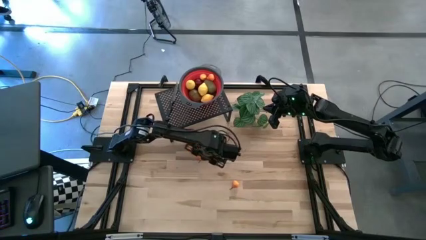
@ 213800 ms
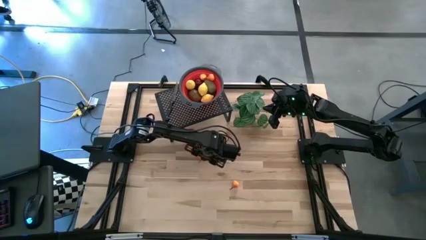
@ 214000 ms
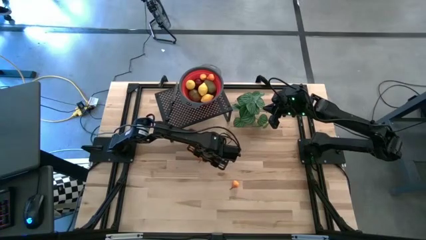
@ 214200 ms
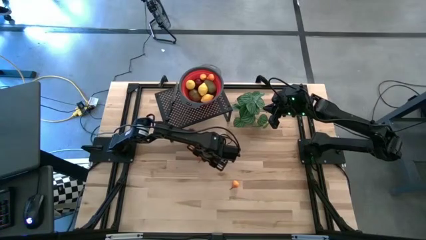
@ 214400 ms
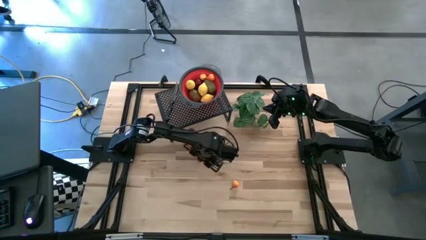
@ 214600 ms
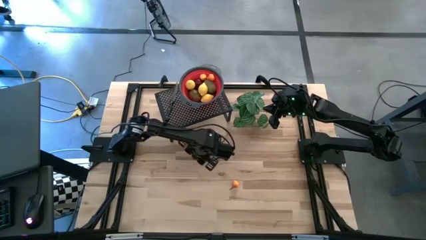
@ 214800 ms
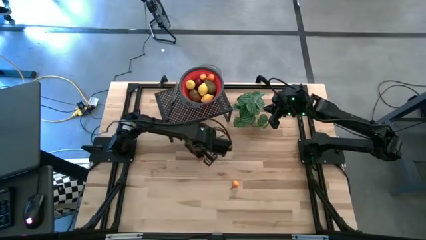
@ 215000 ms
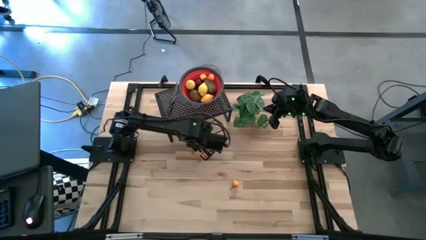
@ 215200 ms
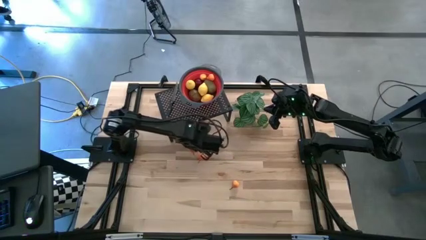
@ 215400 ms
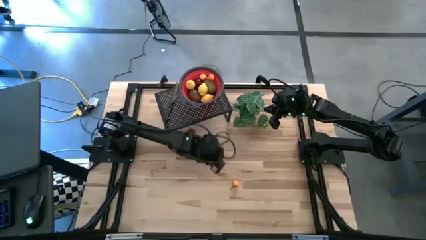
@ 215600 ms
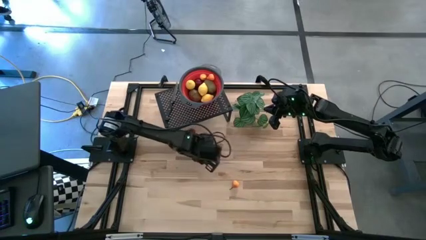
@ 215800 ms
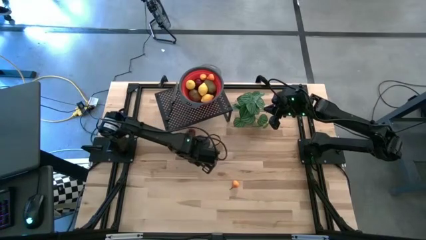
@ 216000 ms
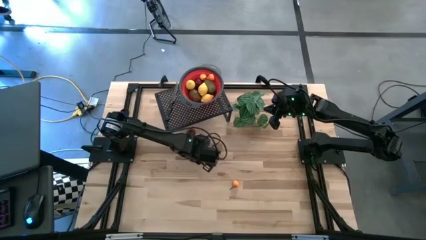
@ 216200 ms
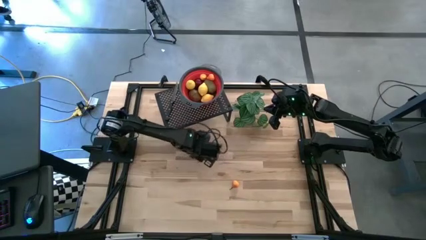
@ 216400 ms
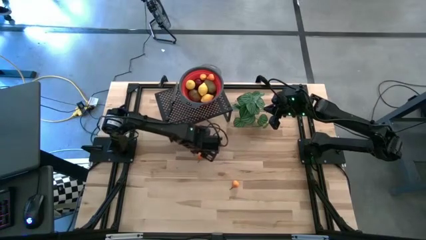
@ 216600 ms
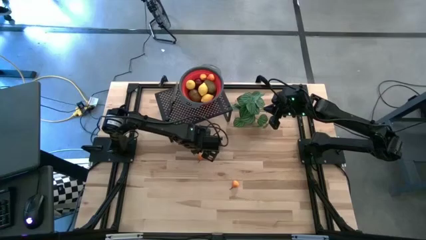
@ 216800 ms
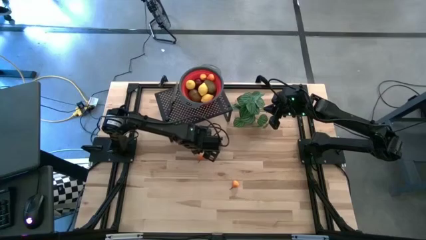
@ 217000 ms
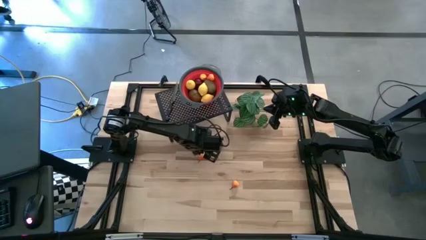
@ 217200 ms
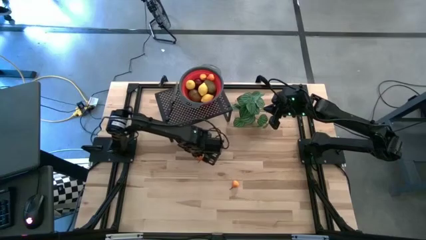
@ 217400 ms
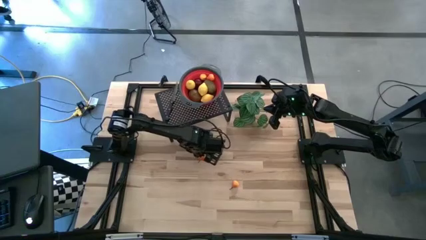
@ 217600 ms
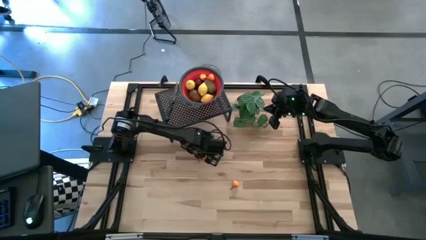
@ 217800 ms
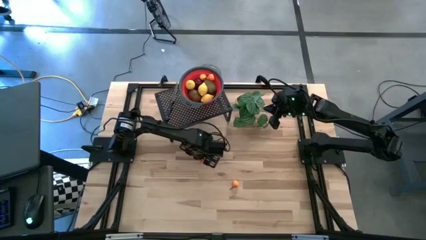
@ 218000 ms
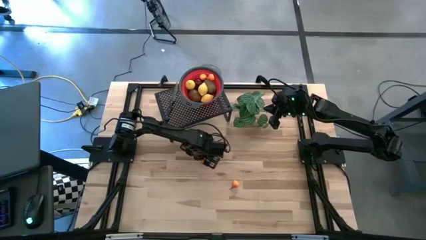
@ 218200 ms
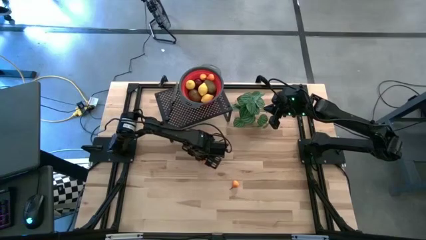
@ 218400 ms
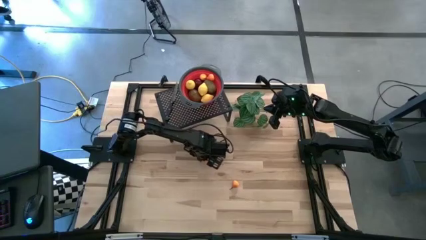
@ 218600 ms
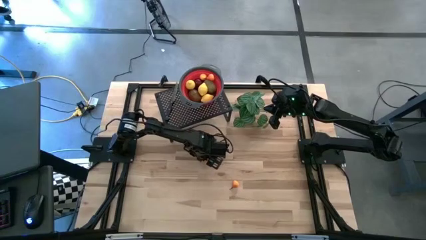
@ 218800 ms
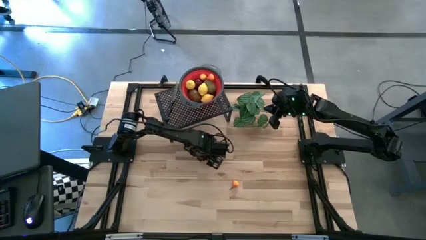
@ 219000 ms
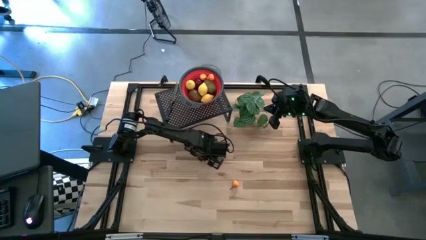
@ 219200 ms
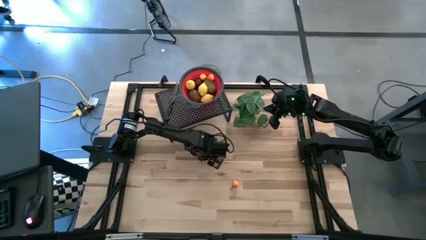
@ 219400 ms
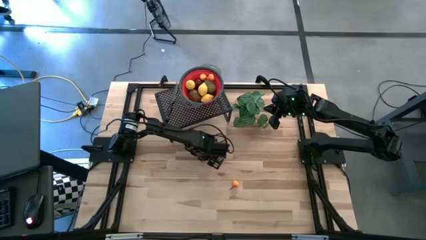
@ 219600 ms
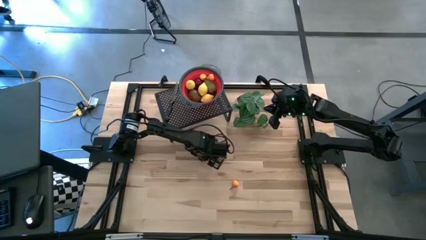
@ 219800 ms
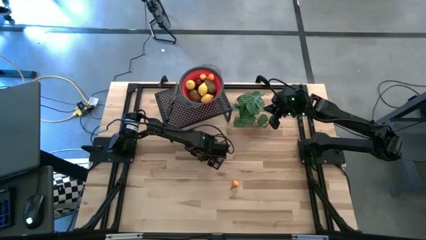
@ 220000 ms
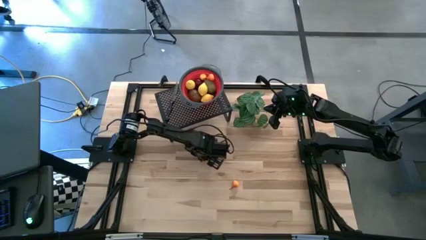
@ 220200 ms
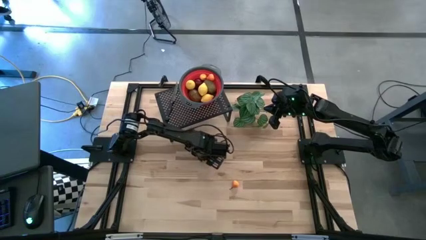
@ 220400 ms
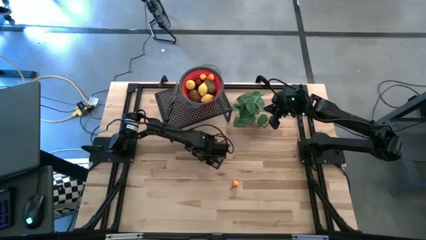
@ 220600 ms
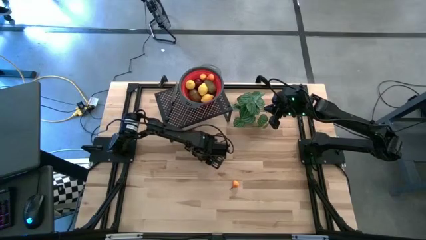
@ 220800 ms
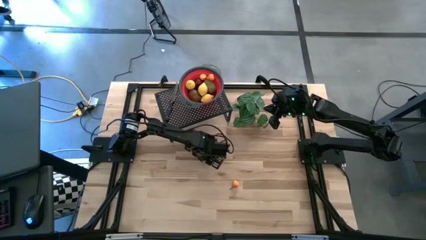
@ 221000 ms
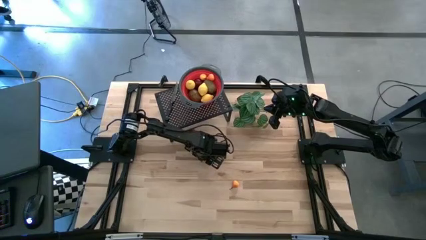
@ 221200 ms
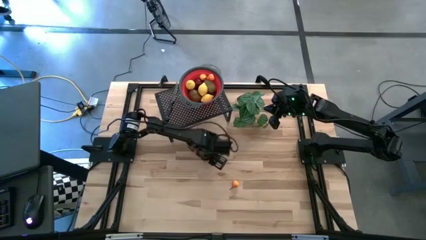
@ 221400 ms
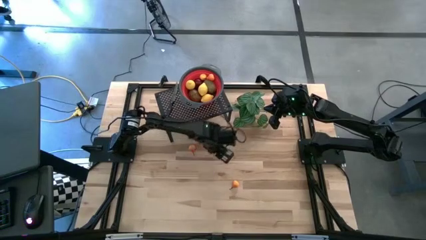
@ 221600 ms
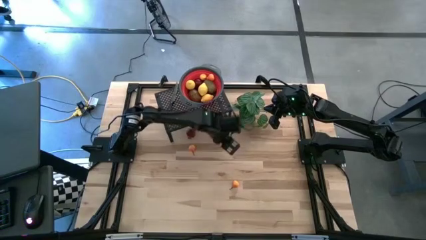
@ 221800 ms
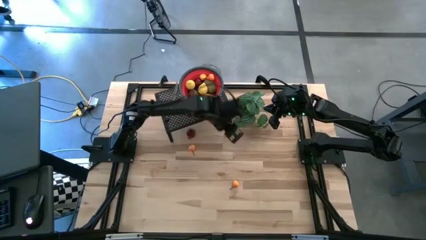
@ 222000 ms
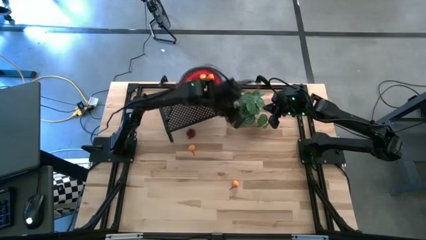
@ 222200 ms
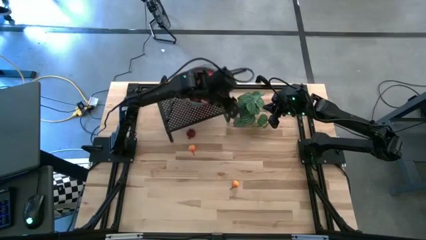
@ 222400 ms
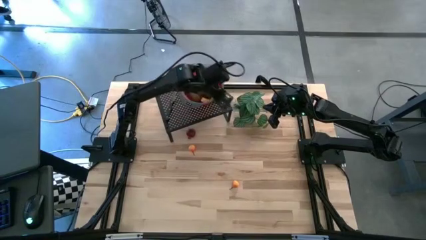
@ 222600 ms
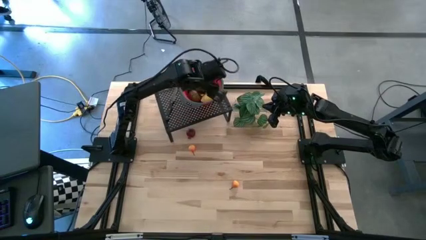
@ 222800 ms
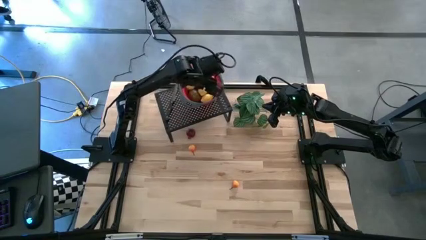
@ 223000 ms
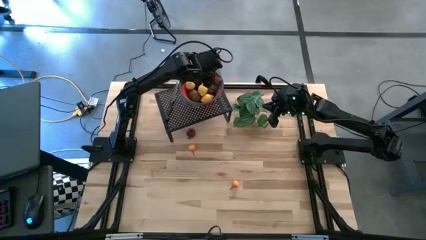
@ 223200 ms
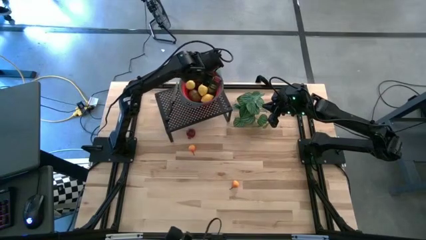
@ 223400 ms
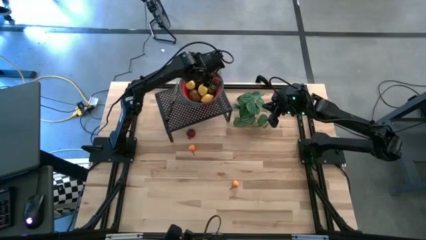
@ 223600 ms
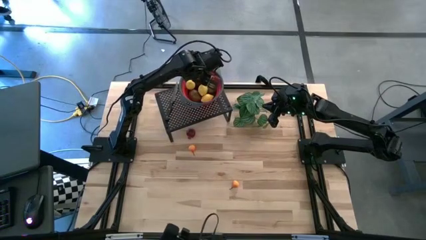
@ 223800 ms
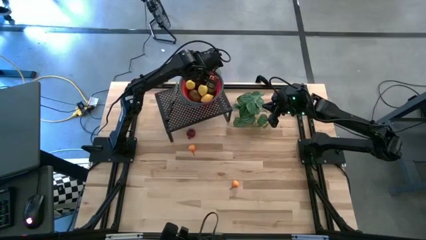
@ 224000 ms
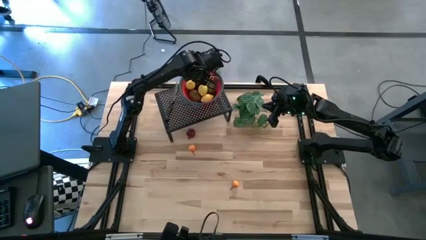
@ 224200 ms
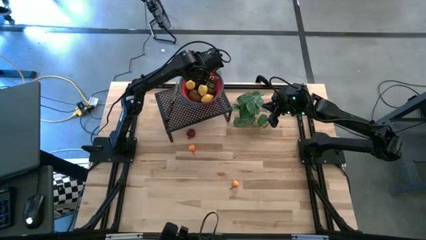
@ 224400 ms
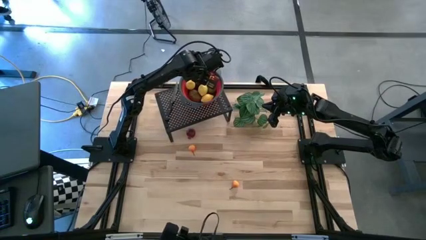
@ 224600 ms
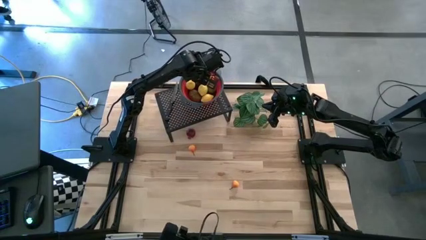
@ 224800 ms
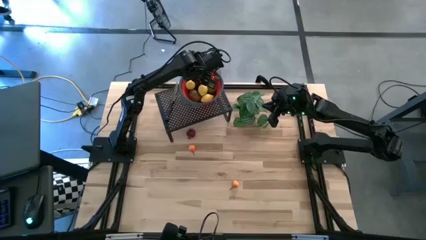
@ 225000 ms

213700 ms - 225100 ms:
Task: Pick & Place Fruit
Put the orange pear into the red basket on the shelf
